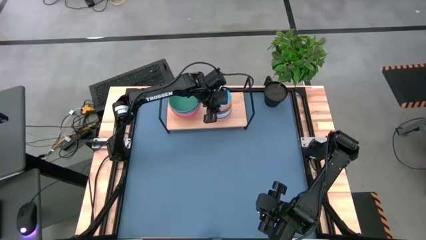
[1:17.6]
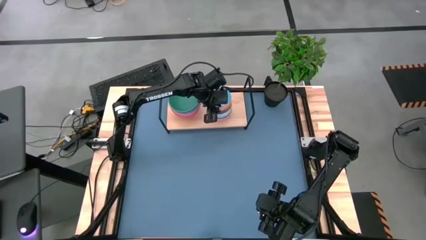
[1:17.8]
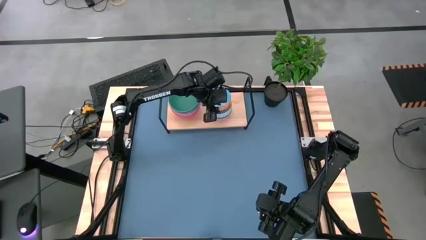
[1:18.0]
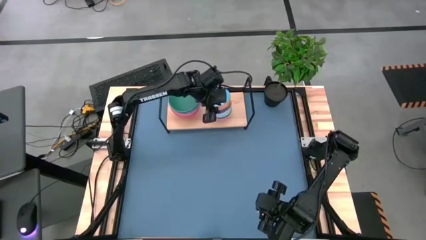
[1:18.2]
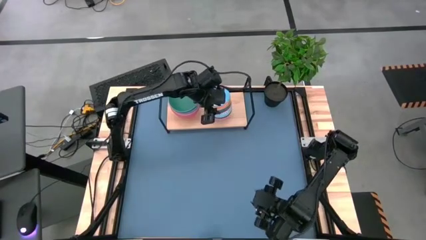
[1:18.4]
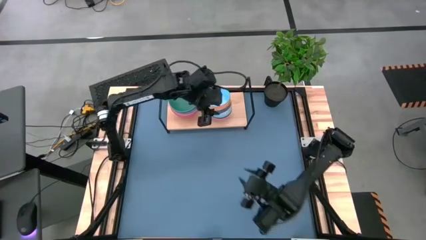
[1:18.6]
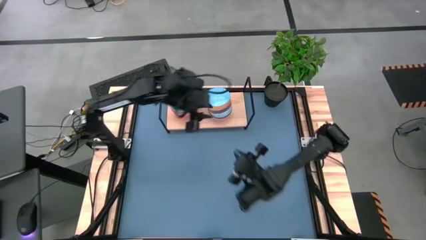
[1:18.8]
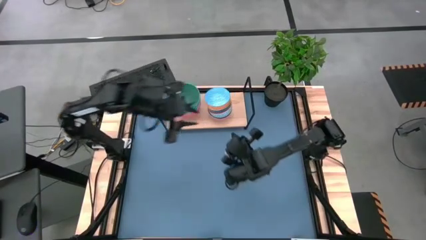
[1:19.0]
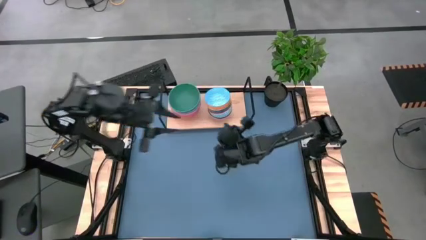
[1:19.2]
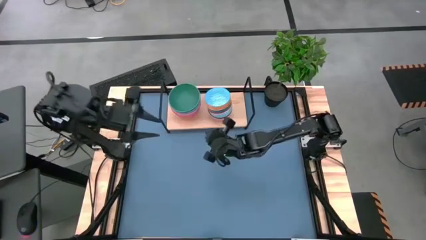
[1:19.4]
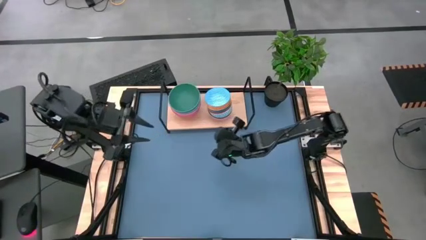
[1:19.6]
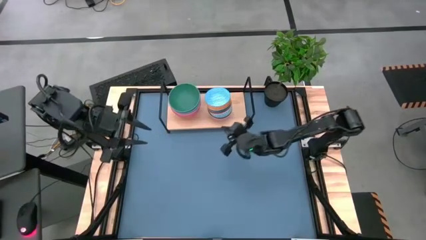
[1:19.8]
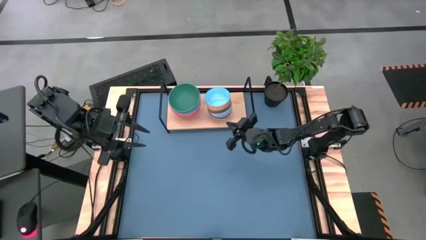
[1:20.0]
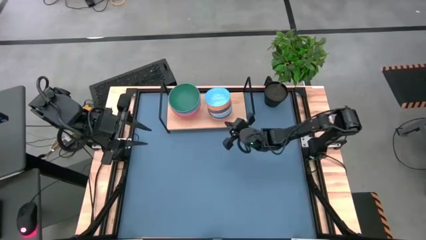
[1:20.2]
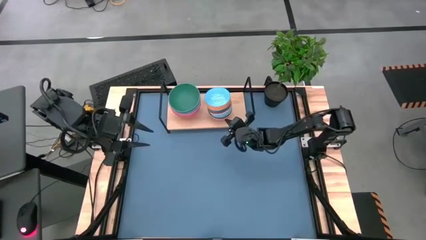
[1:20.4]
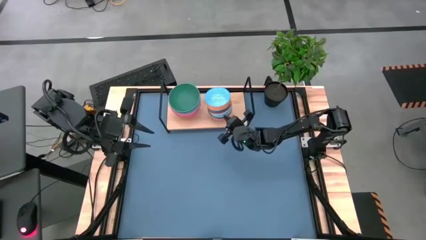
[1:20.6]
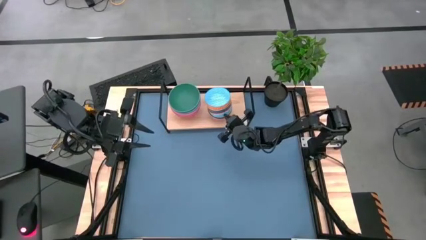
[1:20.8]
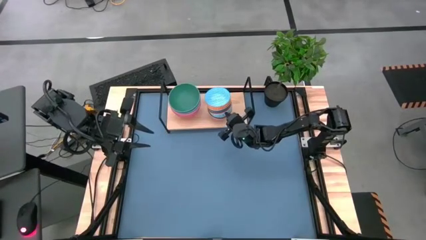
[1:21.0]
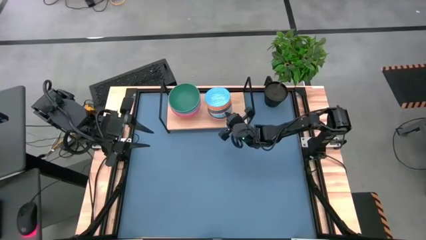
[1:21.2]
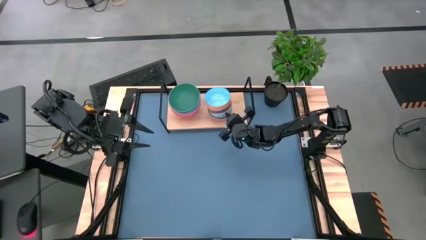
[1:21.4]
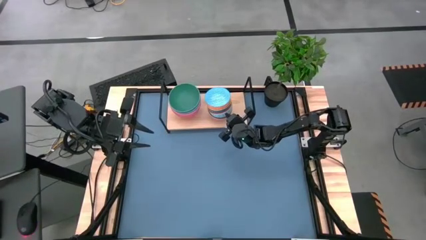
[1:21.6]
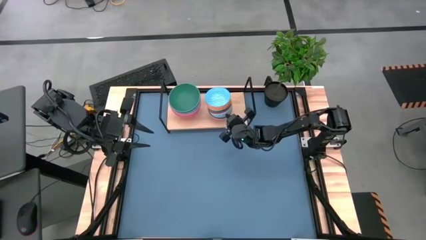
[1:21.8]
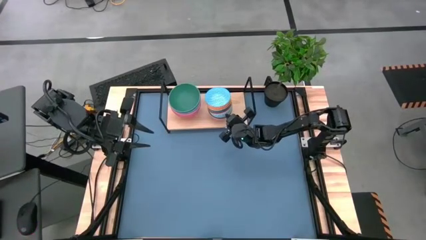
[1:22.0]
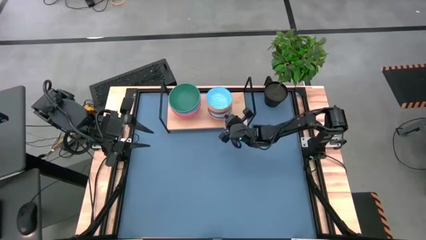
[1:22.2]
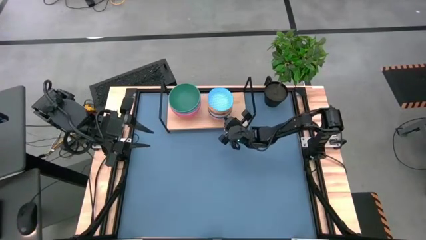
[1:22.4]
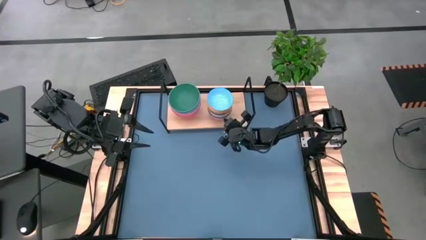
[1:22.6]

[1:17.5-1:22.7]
Task: Place and stack bowls onto a shelf
Adjust the stacked bowls on the shelf

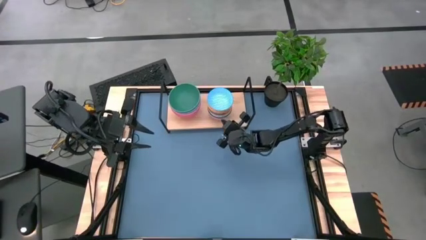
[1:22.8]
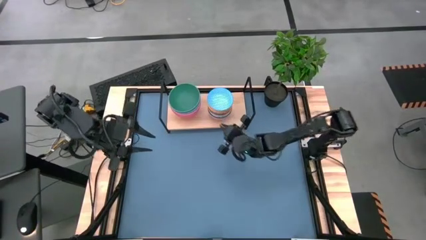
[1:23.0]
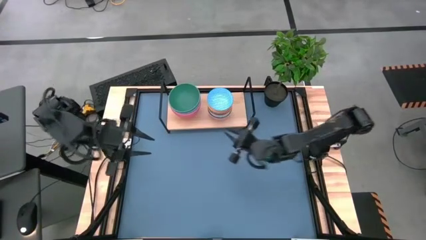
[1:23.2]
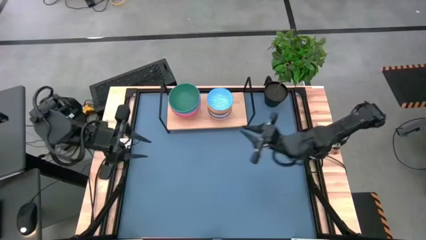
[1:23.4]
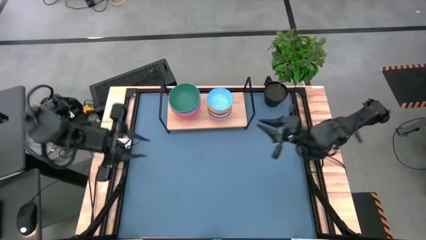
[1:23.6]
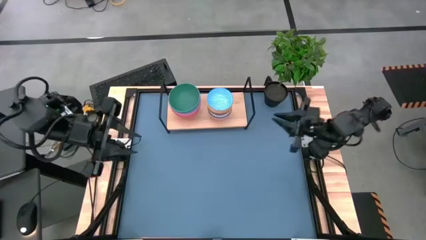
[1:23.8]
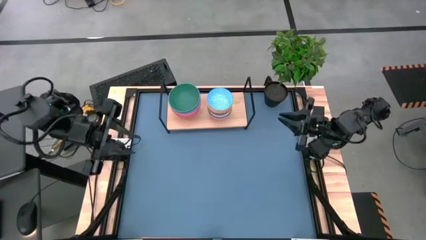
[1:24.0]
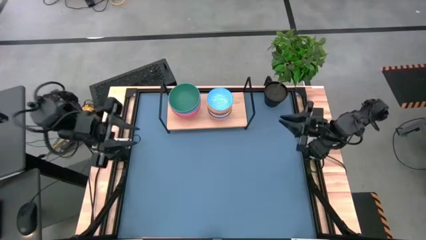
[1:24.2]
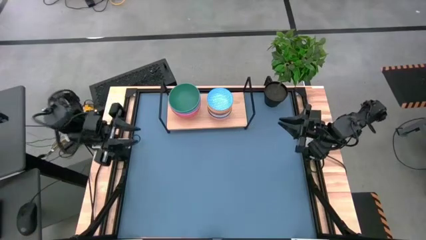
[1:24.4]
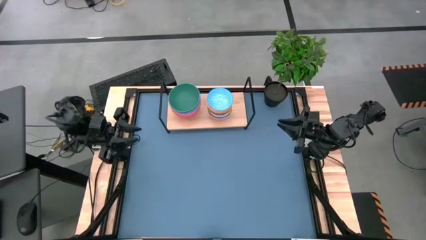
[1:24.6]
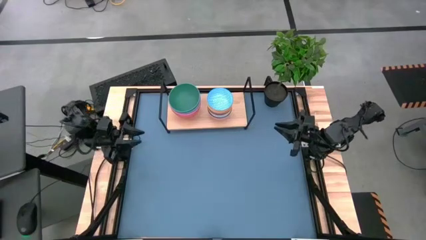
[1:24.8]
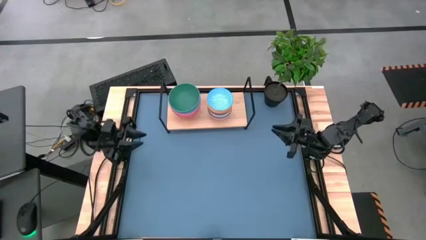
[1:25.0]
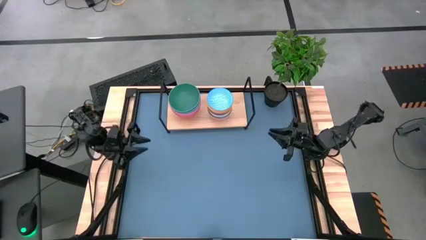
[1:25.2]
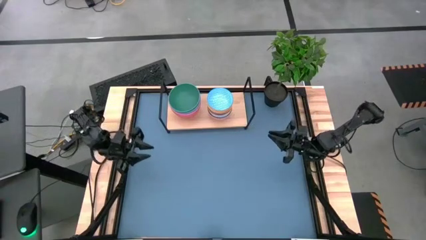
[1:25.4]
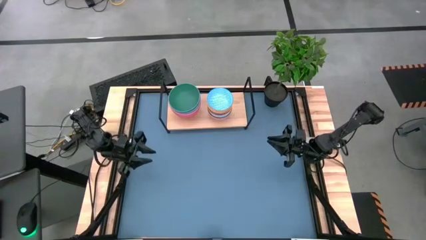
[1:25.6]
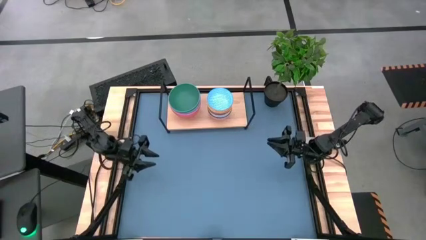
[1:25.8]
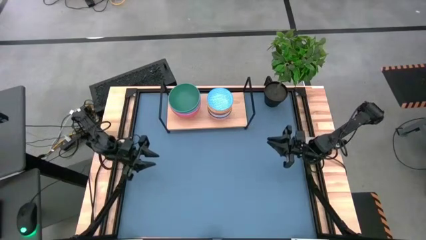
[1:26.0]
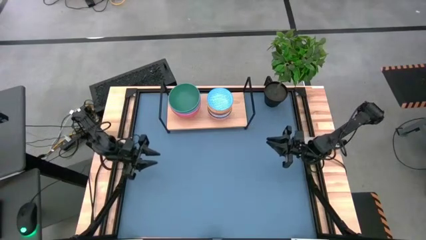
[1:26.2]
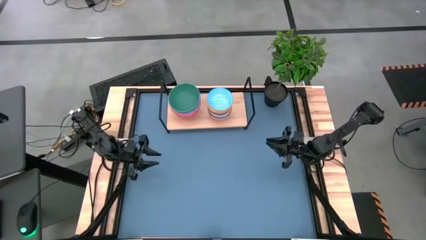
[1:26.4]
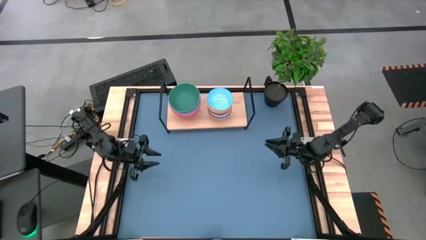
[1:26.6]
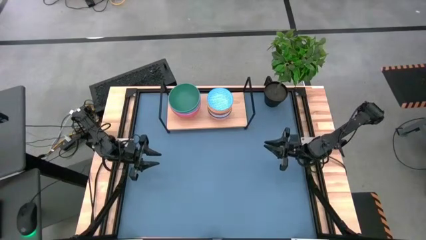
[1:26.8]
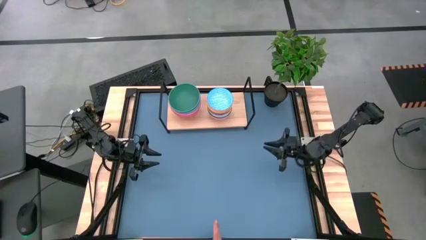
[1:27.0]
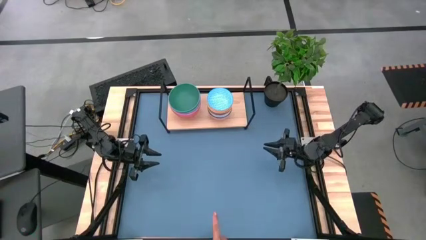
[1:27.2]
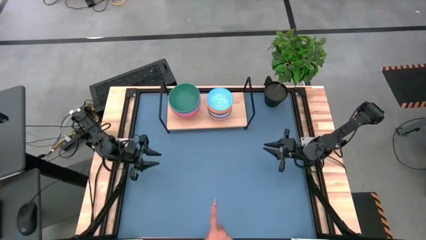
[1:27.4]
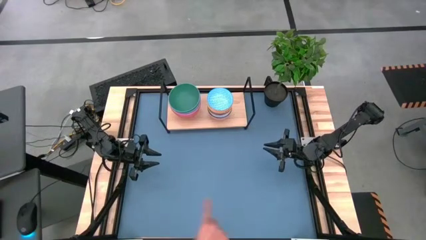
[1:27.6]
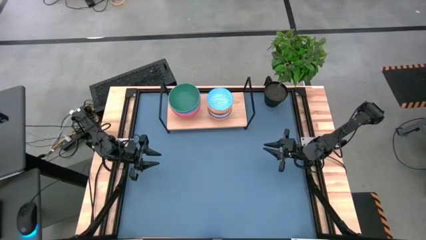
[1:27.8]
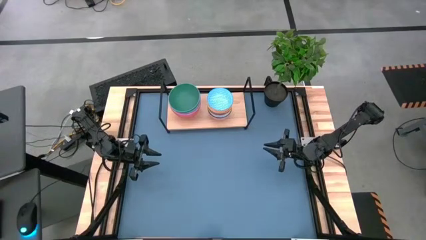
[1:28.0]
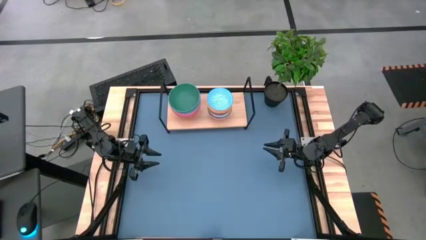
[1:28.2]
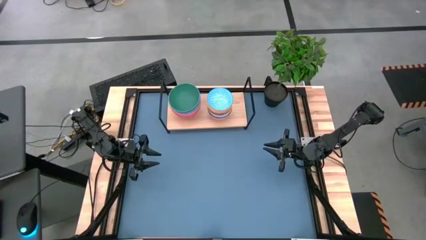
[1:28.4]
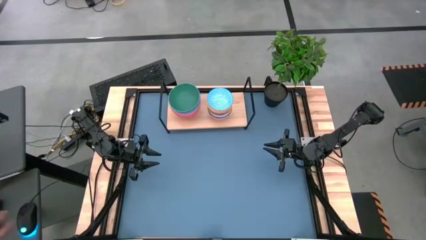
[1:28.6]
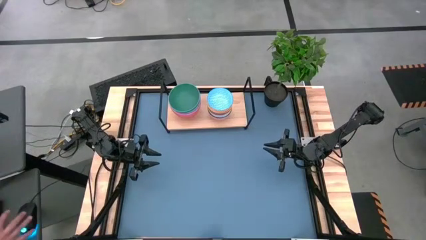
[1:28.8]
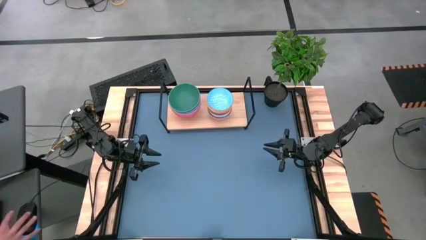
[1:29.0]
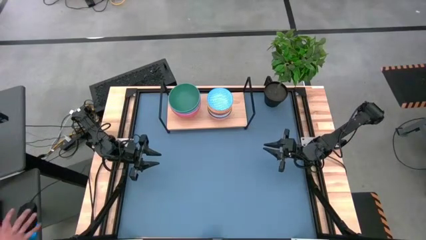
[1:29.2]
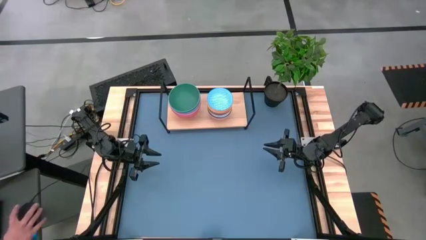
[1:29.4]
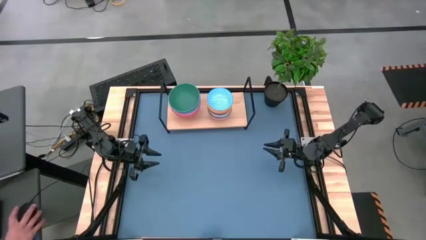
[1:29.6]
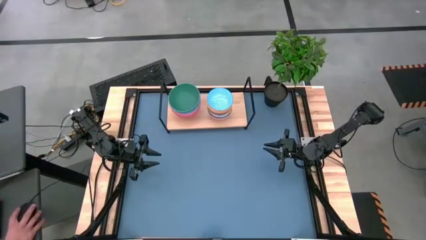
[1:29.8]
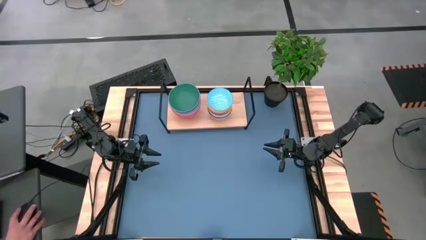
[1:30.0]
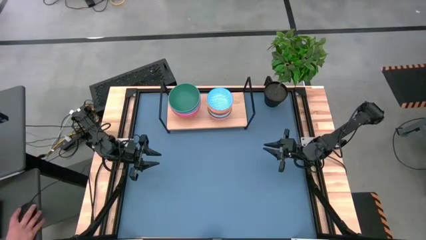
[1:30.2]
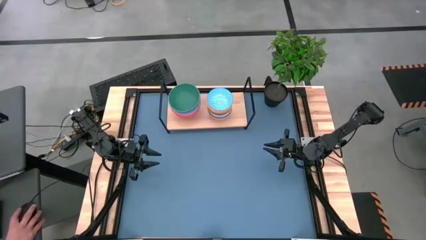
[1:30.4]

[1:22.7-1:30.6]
Return to Home Position
